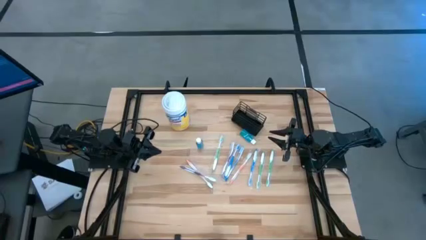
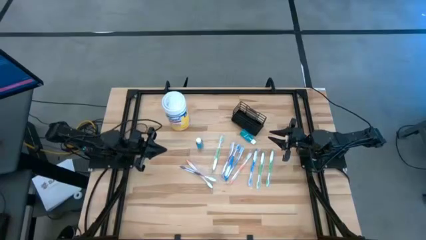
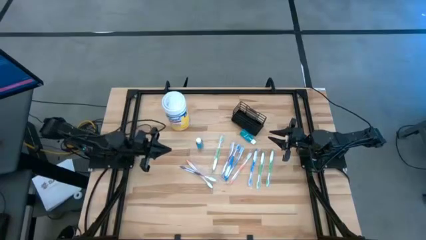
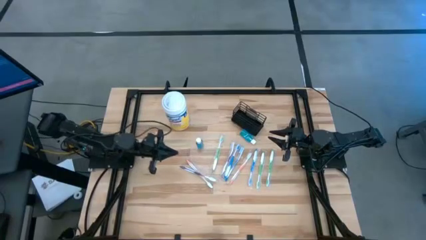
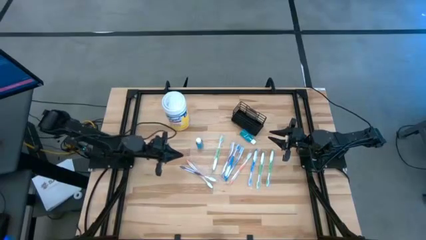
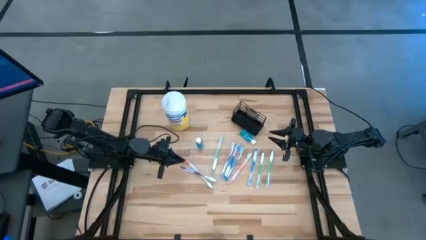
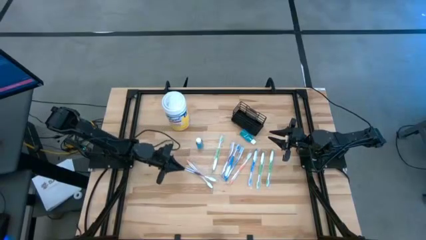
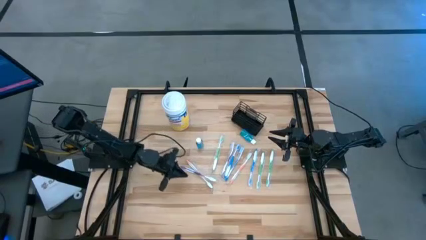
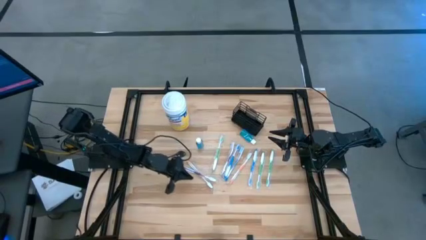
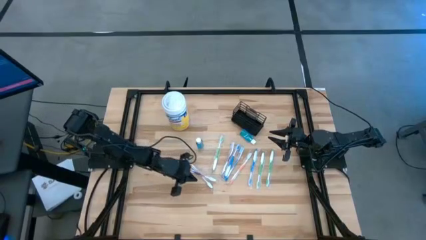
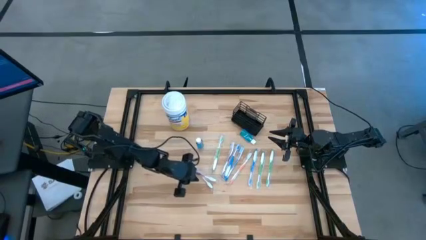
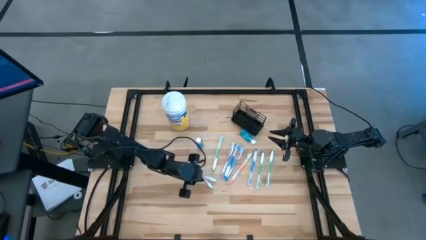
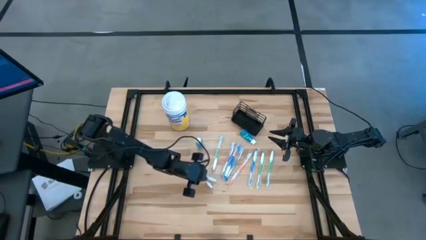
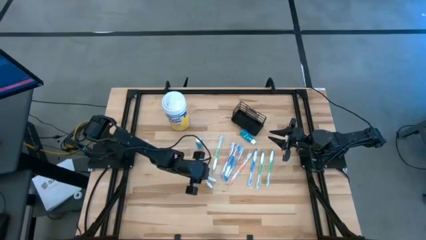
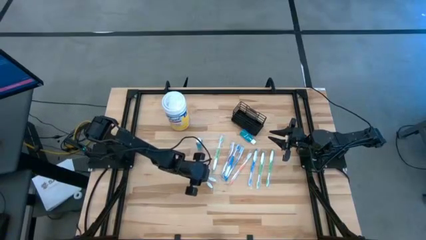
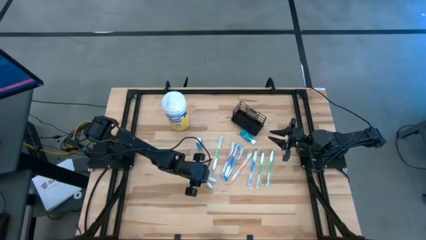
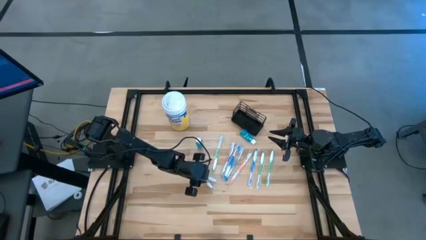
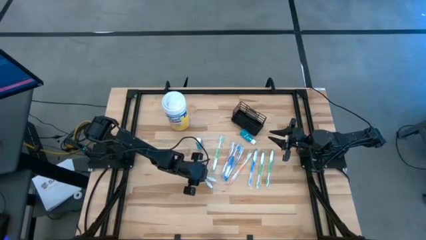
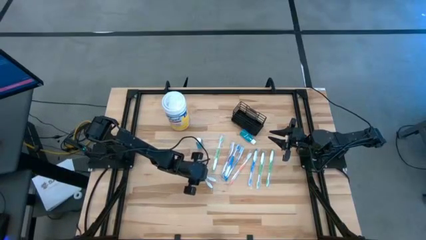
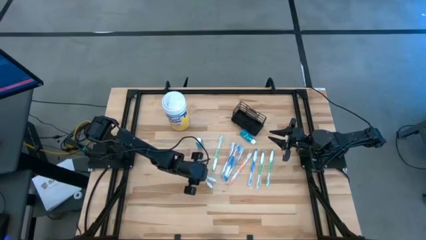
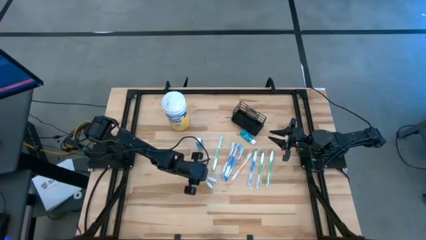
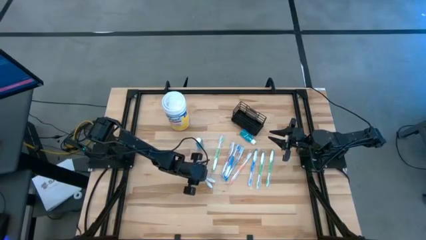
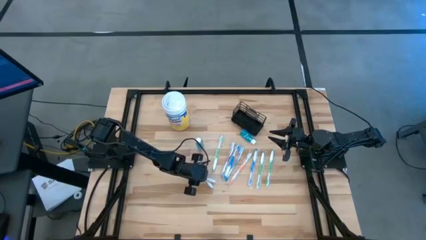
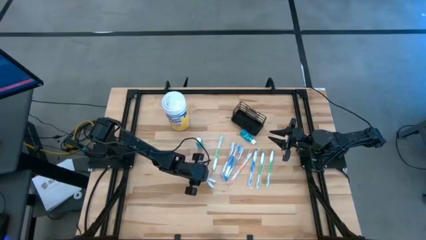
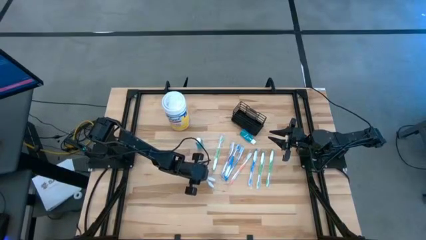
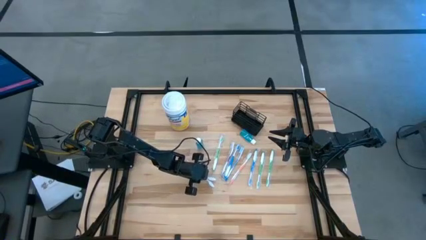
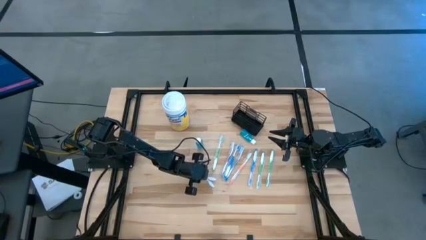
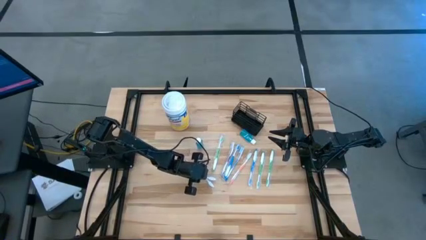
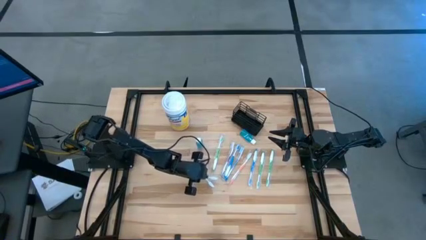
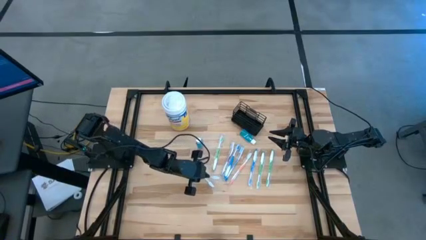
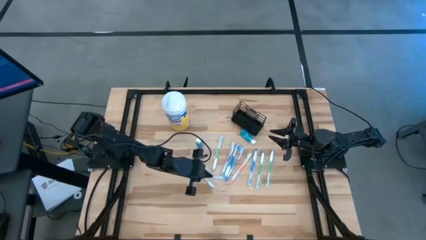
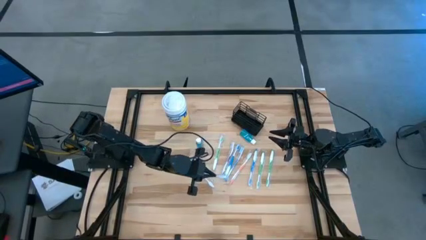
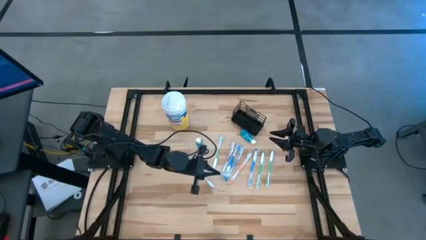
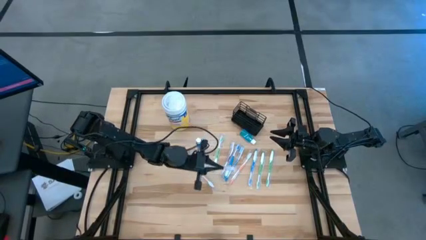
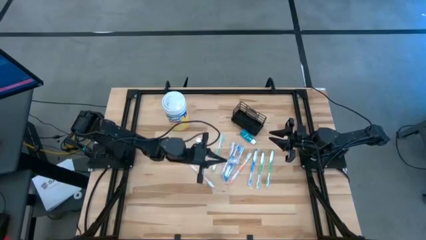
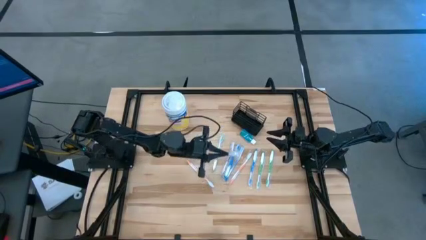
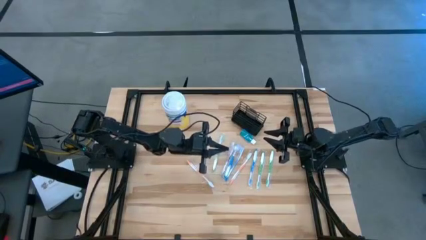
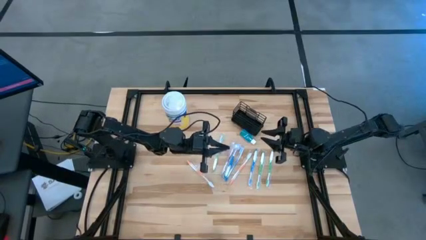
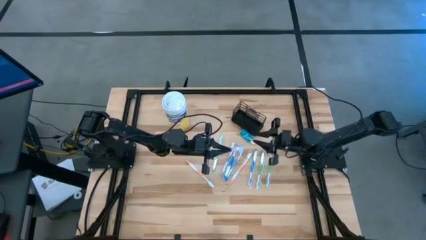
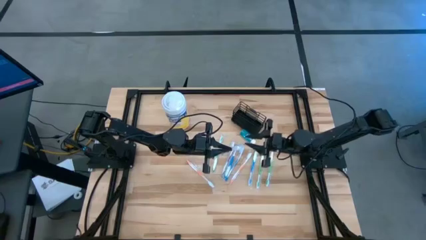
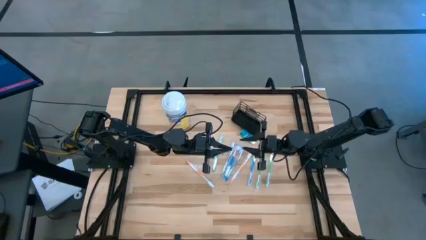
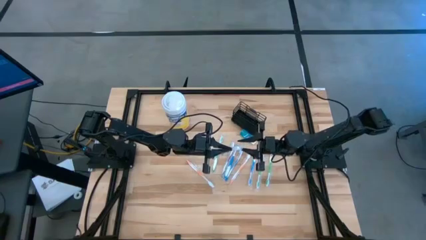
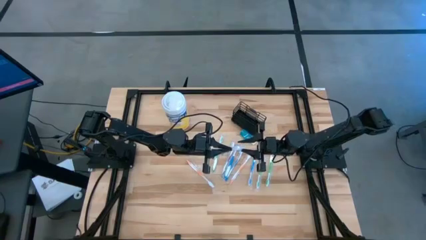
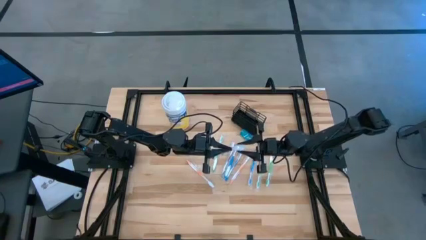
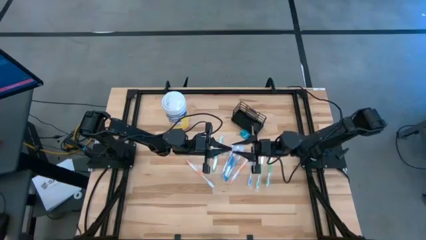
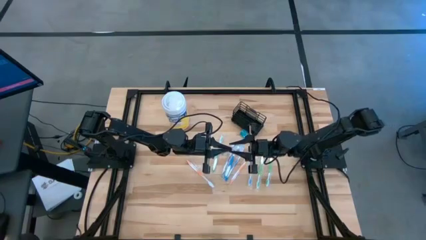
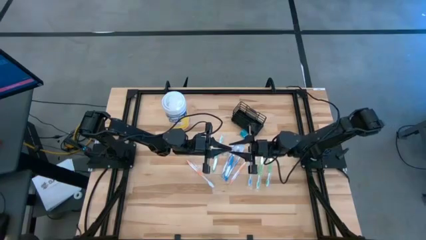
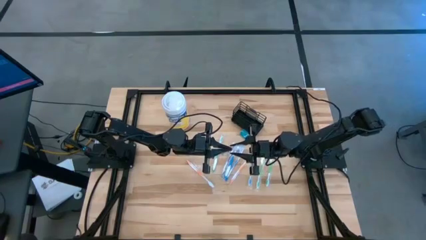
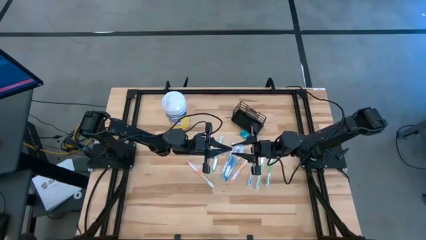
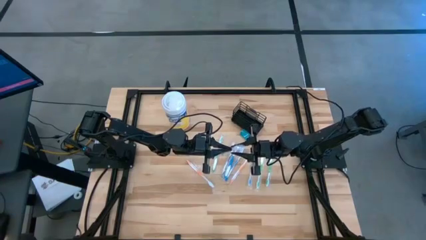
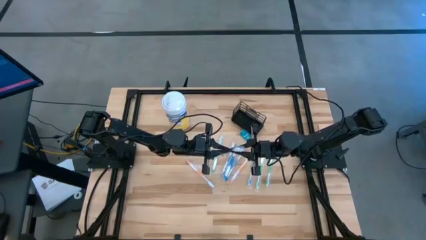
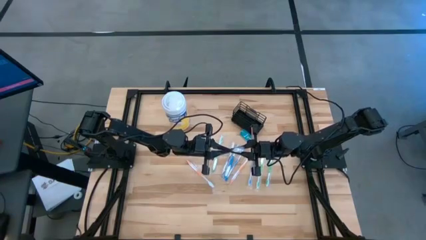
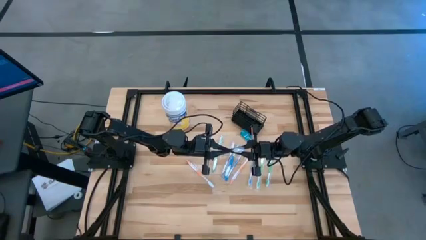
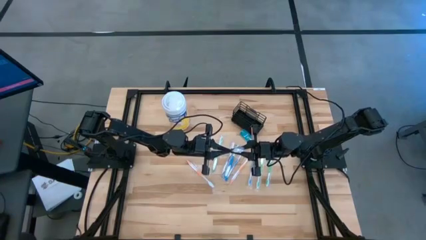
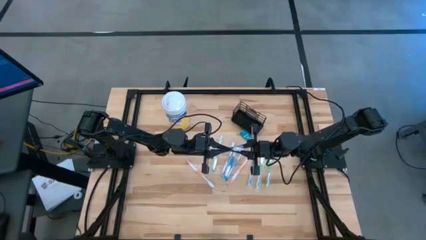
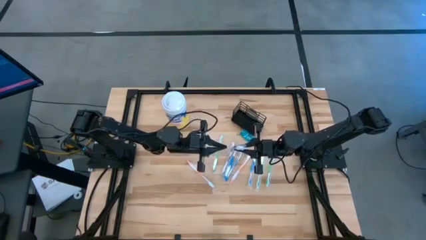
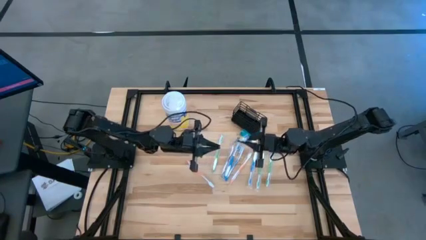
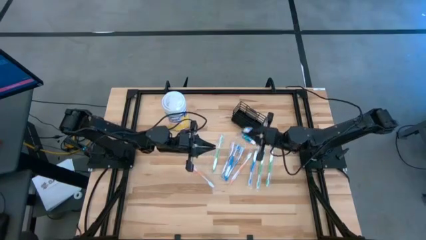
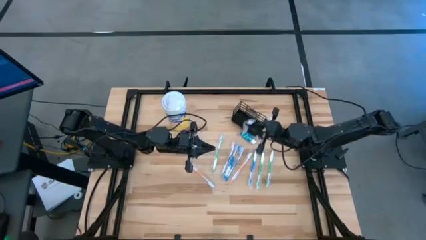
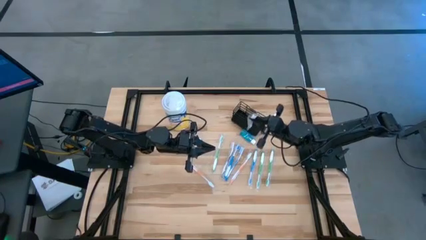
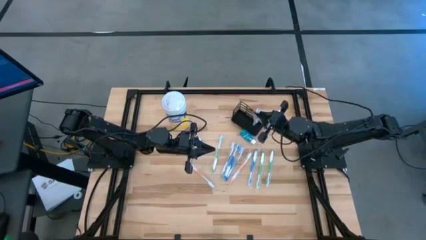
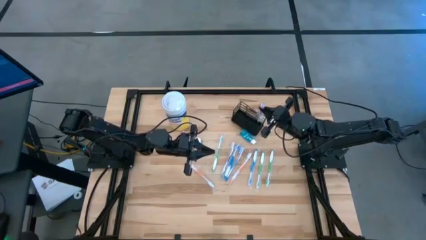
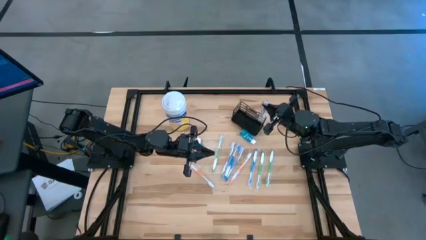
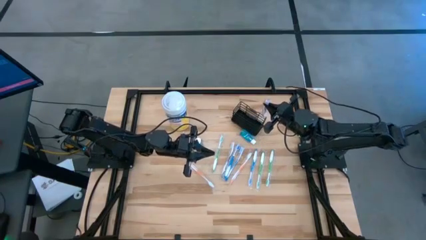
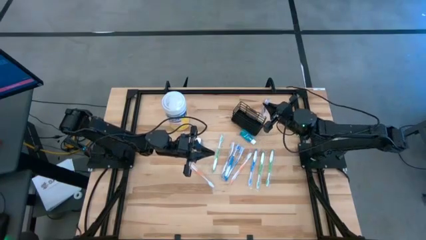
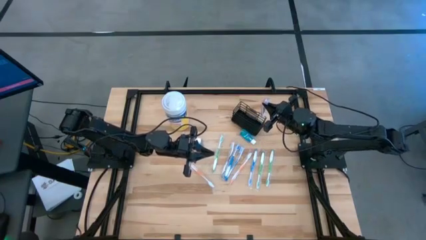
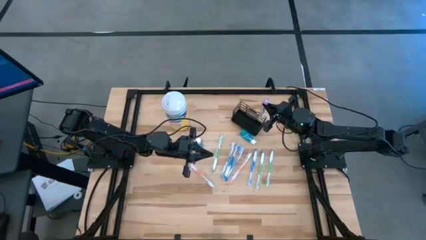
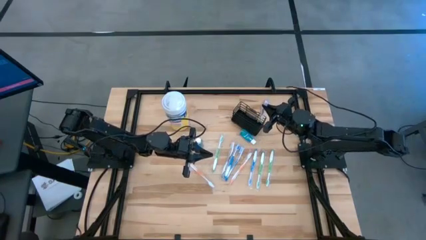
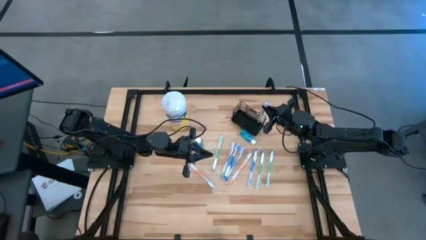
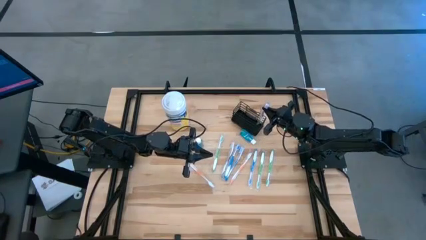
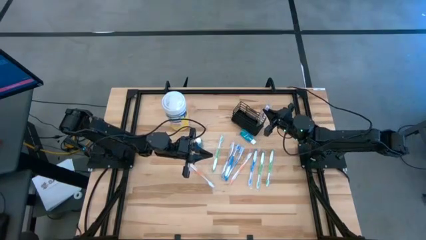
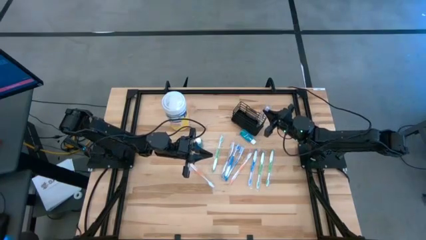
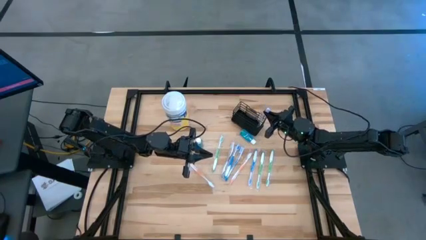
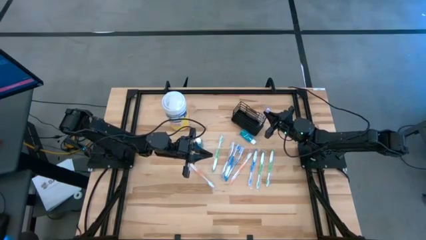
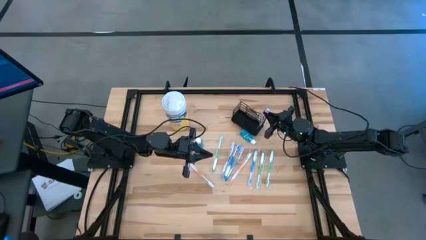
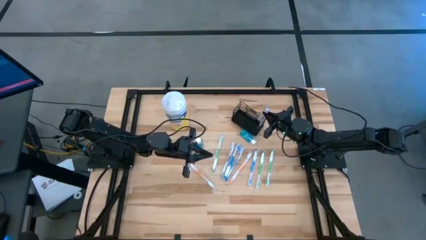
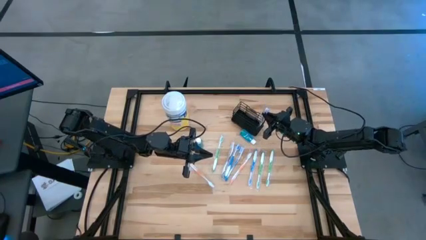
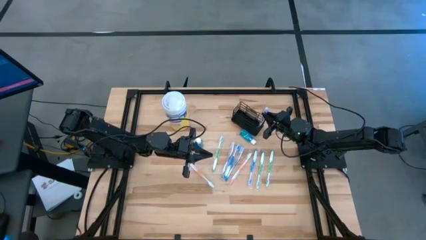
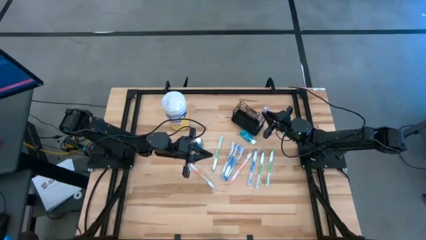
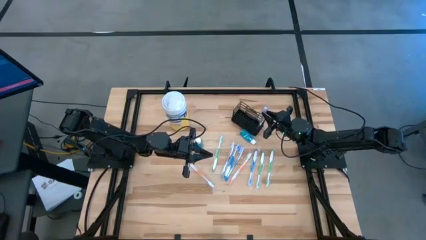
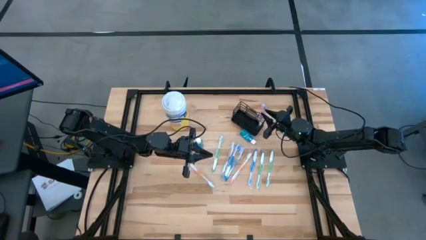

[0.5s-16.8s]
Task: Pick & Place toothbrushing station
Put the bottom violet toothbrush into the black wire organizer
